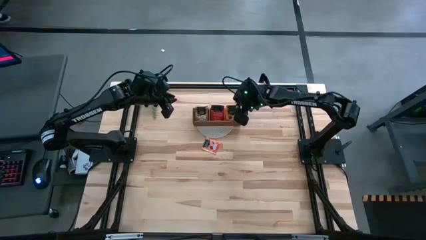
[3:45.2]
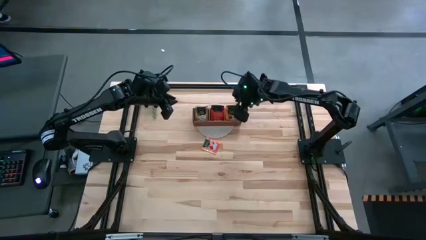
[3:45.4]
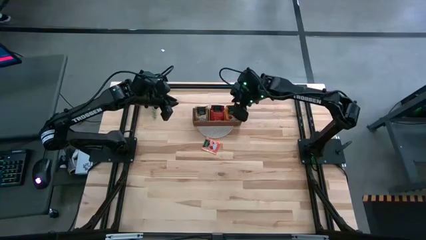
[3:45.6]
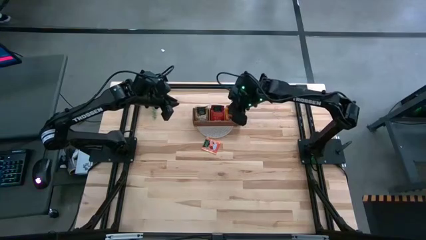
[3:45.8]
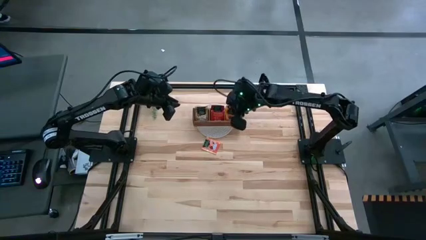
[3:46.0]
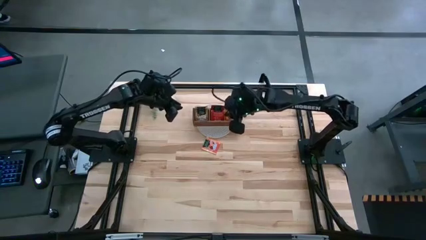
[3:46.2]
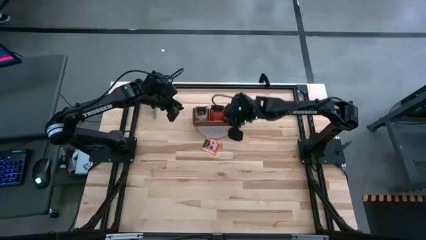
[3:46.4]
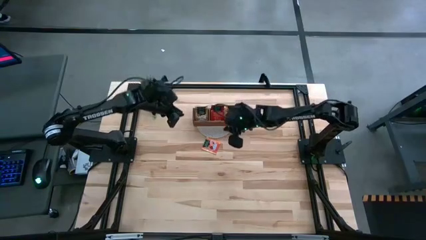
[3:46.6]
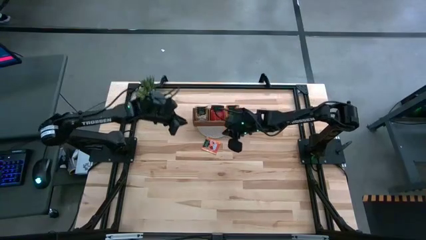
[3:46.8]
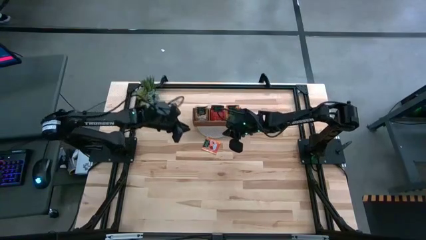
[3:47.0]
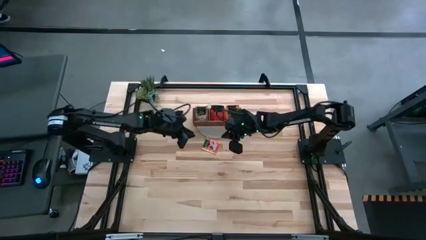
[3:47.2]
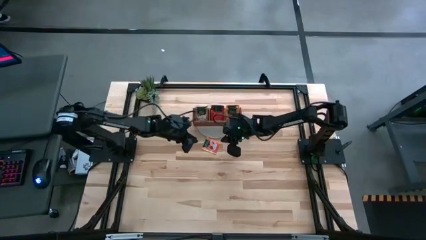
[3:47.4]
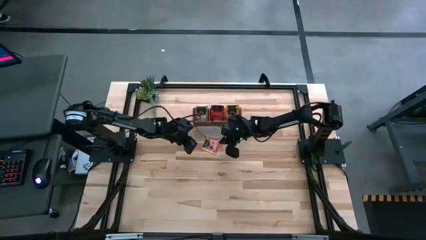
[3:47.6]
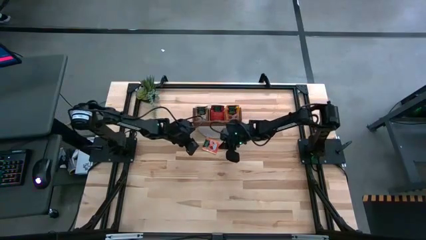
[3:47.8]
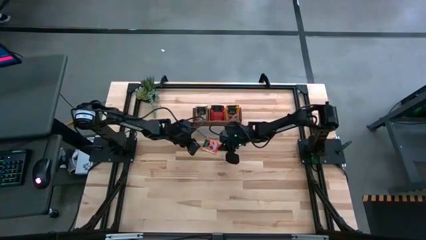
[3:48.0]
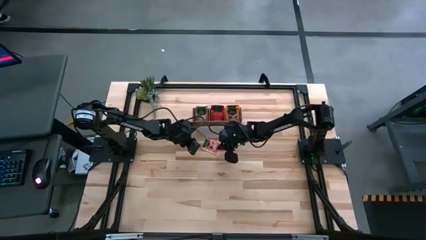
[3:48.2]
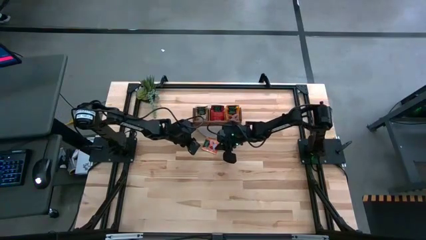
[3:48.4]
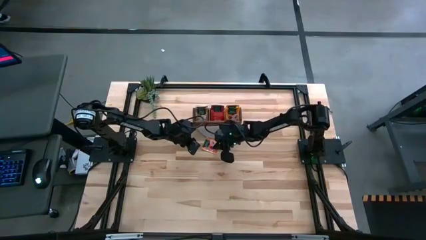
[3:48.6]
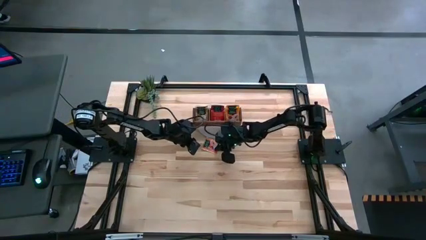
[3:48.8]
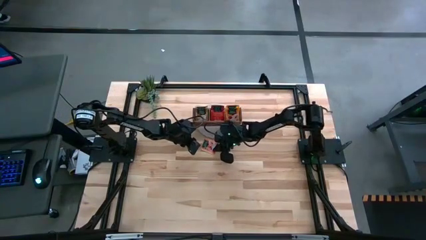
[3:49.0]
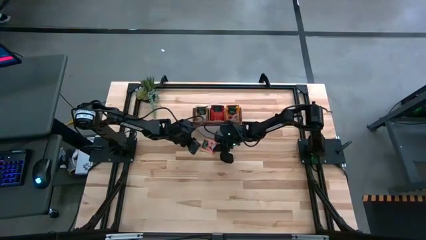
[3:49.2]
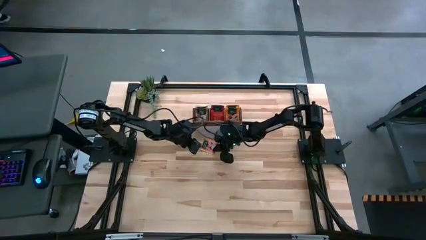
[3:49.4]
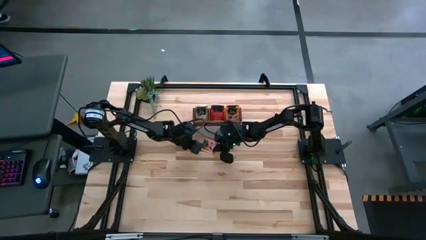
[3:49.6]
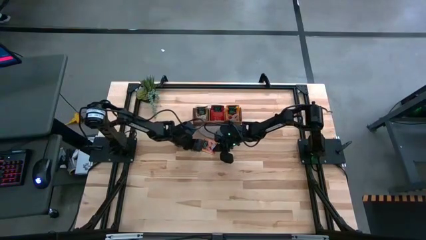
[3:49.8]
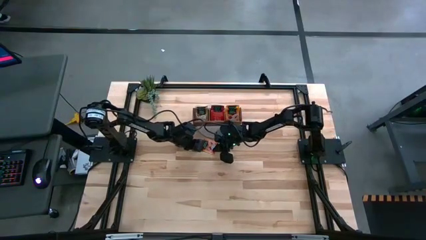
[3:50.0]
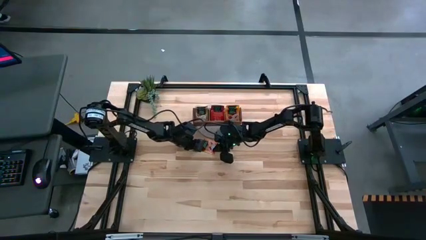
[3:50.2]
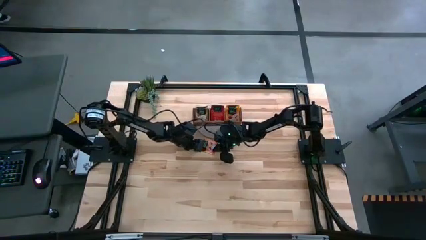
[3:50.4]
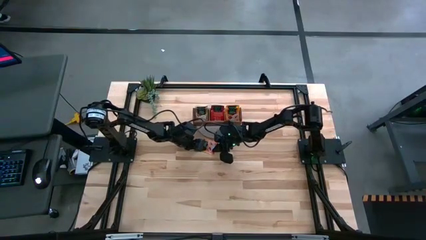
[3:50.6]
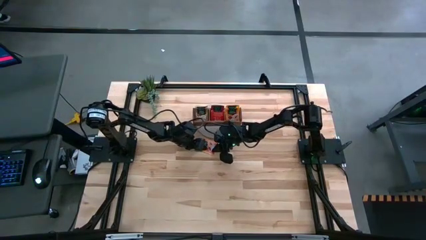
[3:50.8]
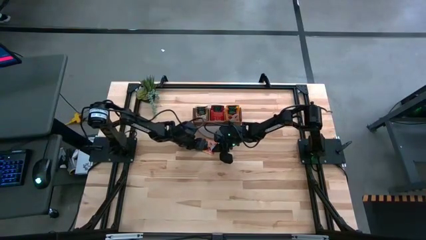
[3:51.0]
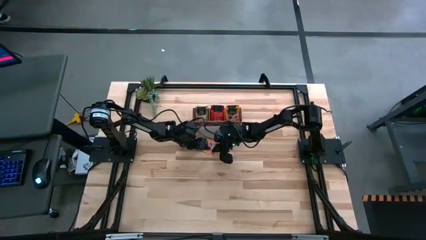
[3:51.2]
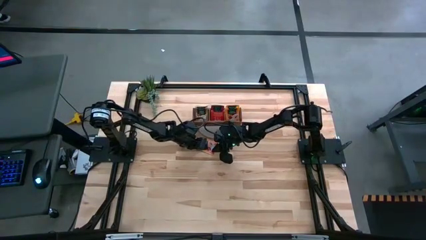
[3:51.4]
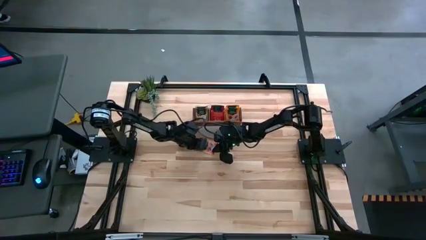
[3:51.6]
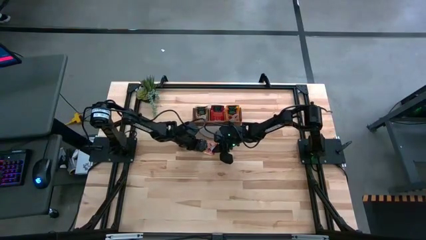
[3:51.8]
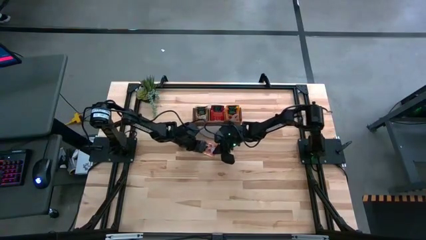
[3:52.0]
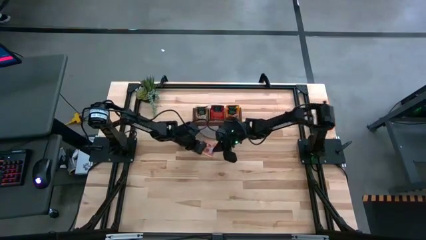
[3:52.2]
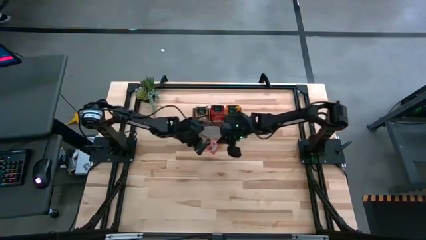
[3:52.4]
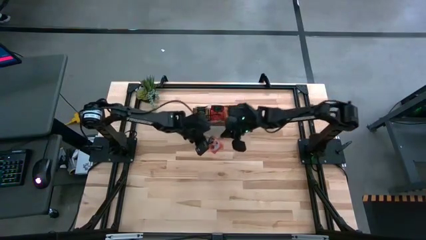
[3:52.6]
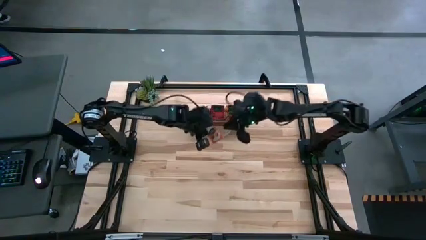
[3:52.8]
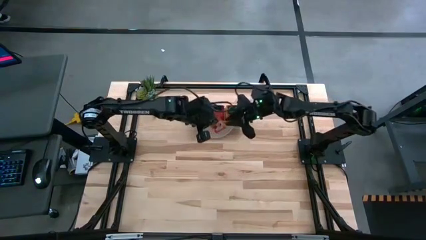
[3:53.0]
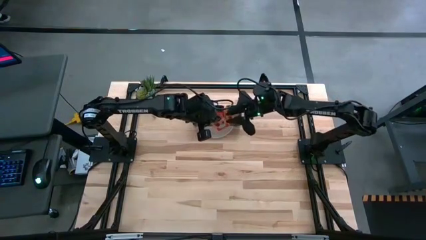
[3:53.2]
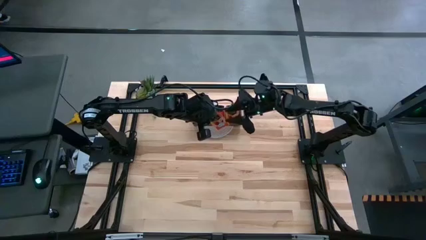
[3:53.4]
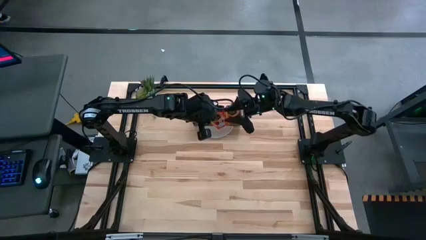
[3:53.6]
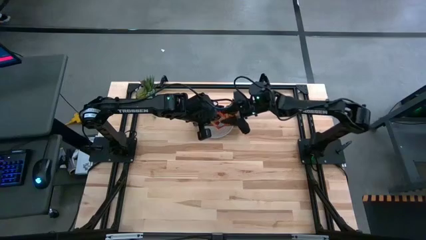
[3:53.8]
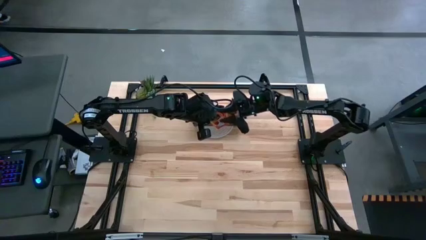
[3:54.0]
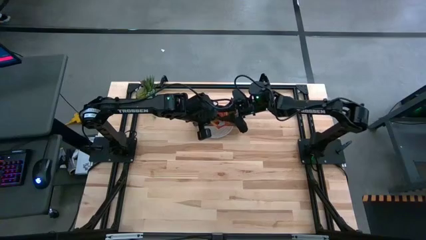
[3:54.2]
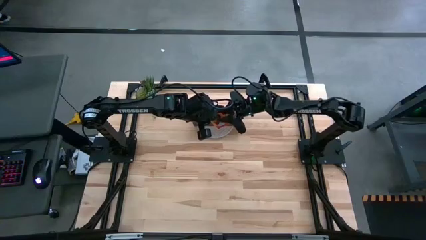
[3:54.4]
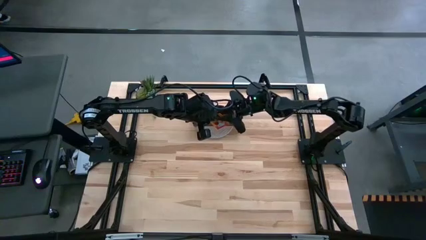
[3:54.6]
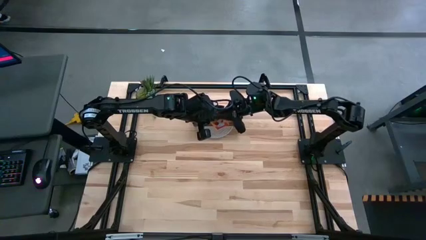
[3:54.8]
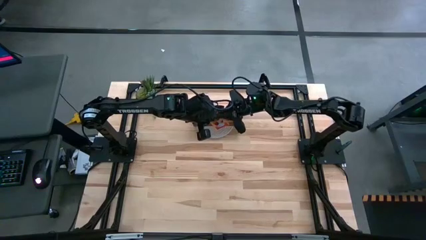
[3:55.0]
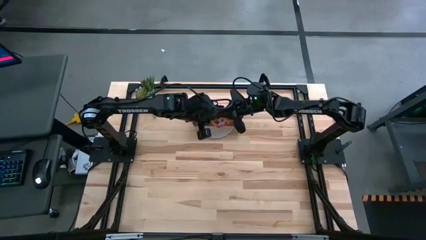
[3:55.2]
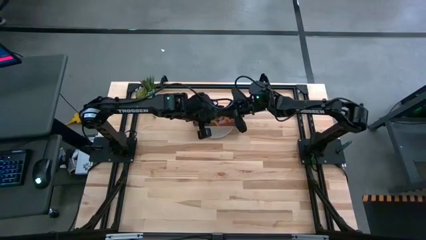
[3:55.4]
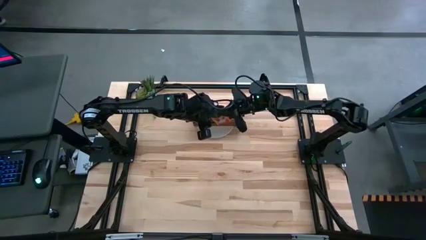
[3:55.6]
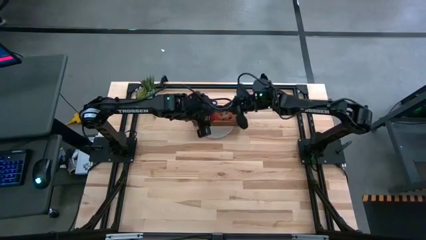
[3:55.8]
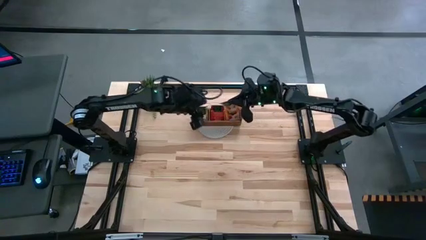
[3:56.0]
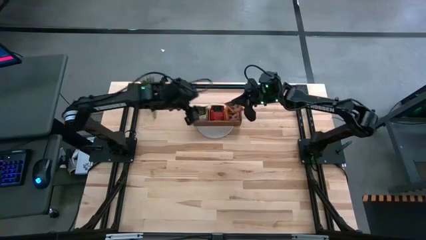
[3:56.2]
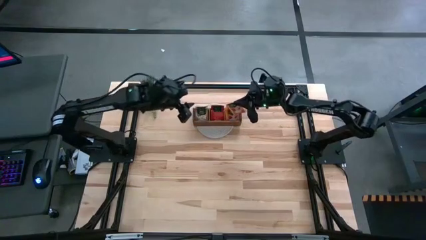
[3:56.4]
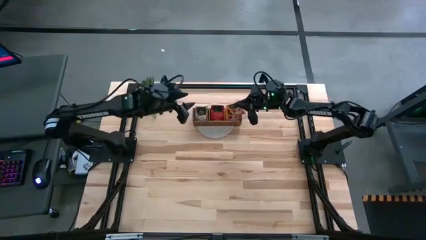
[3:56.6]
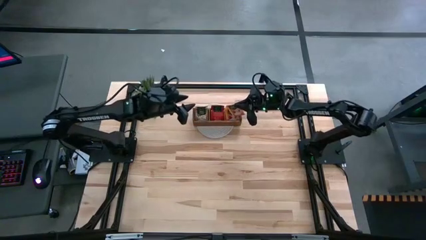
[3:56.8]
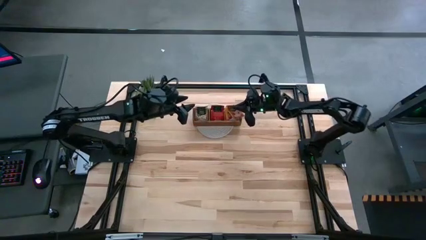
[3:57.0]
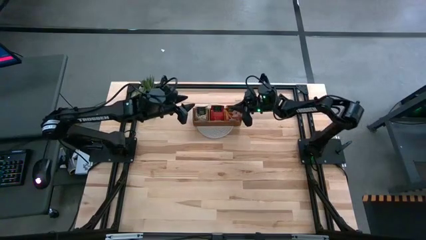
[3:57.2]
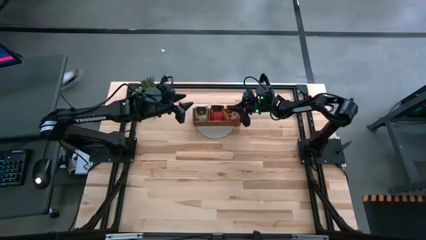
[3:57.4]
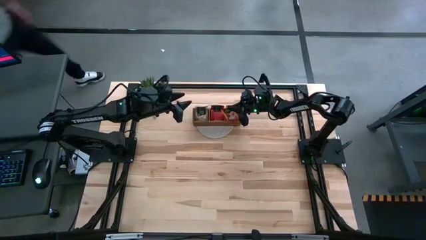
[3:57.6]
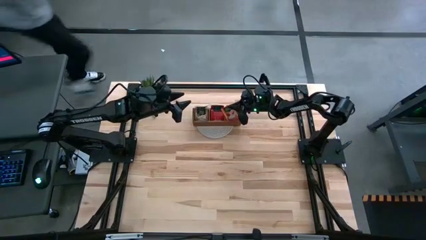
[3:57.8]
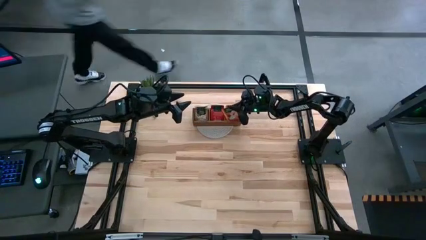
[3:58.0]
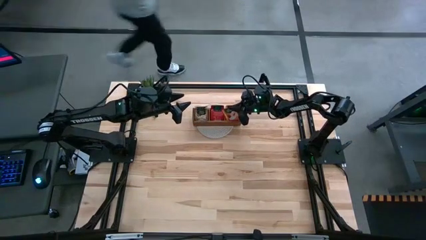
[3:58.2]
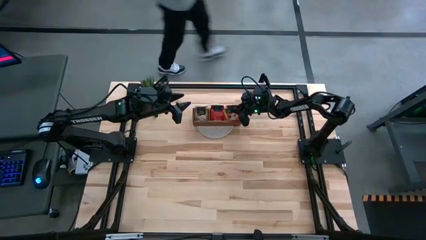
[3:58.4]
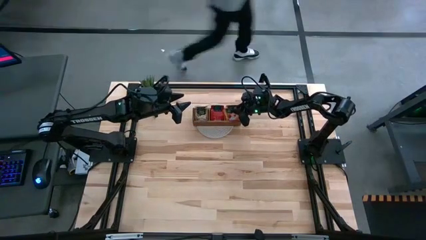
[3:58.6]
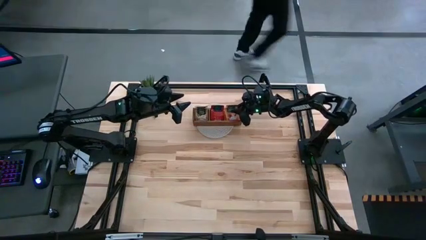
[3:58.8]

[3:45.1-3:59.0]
Task: Pick & Place Tea
Put the orange tea bag in the right section of the wooden organizer

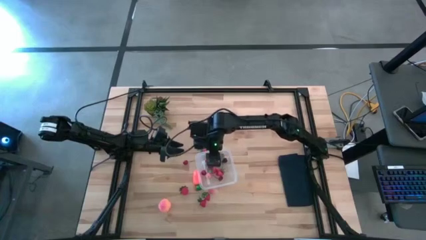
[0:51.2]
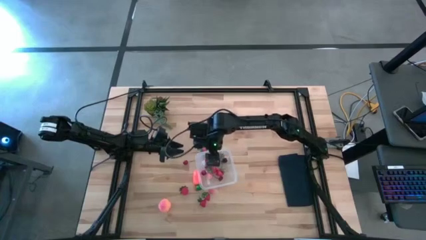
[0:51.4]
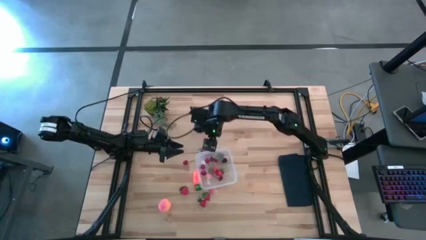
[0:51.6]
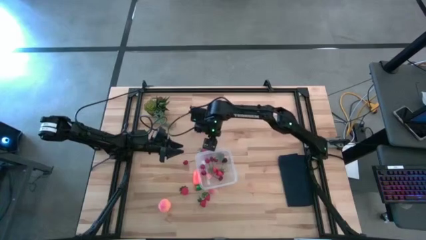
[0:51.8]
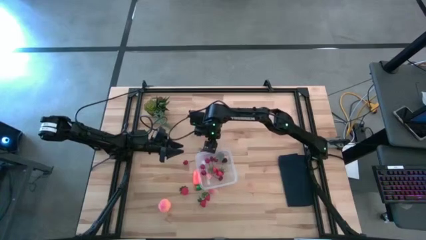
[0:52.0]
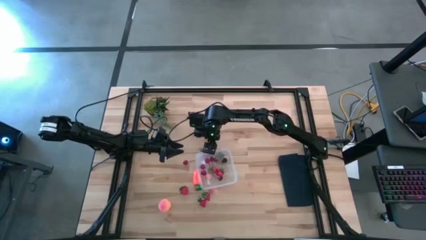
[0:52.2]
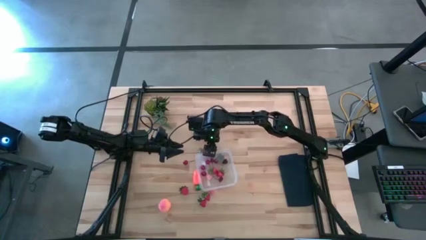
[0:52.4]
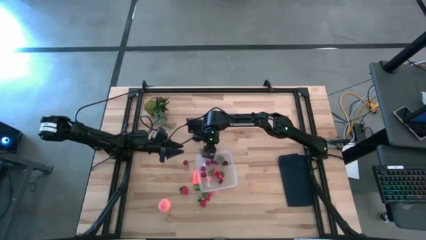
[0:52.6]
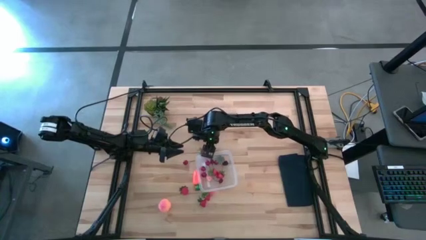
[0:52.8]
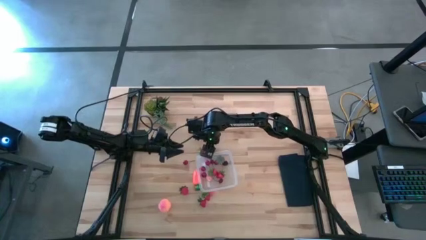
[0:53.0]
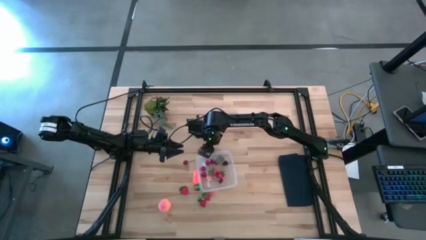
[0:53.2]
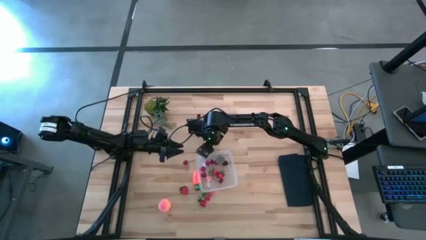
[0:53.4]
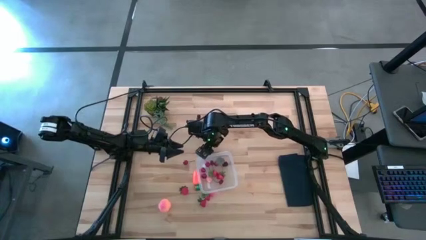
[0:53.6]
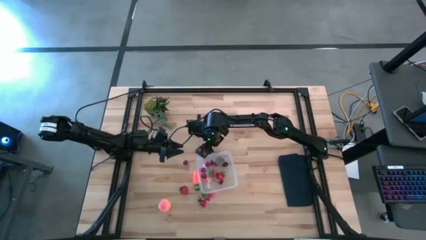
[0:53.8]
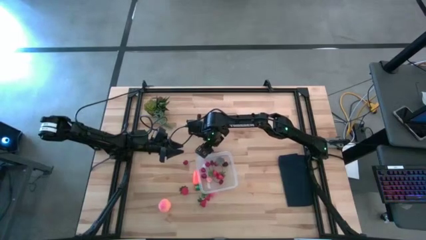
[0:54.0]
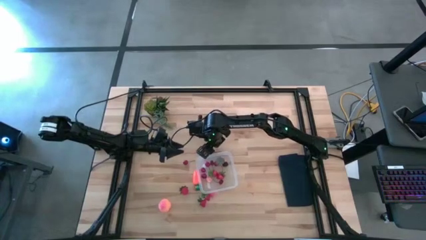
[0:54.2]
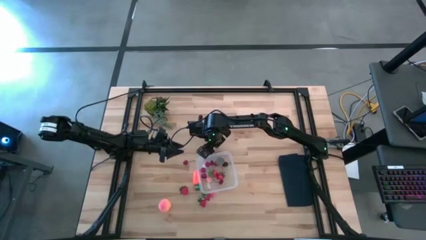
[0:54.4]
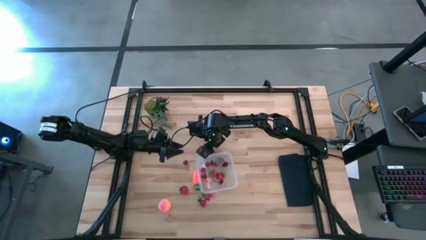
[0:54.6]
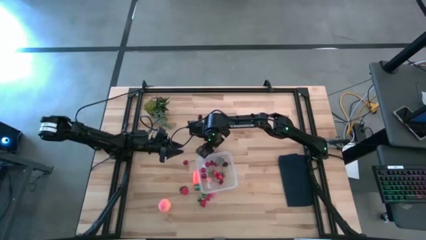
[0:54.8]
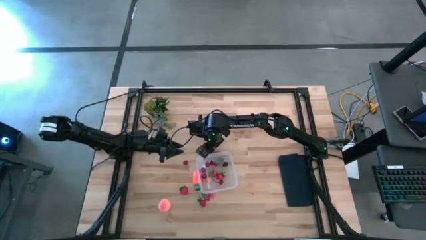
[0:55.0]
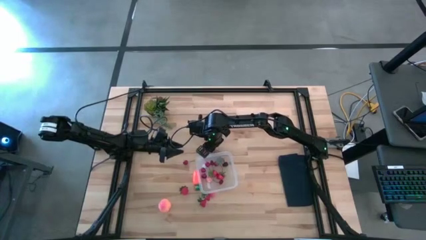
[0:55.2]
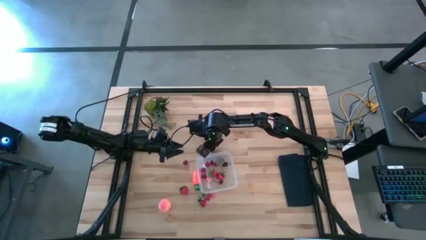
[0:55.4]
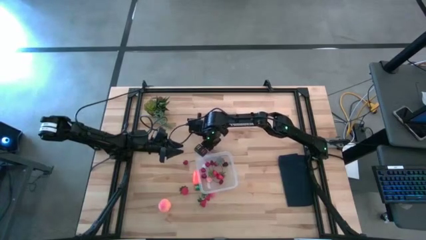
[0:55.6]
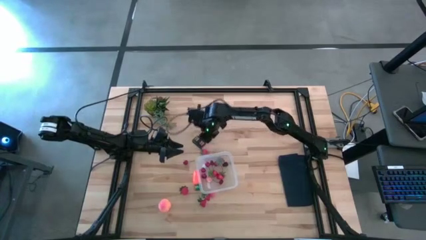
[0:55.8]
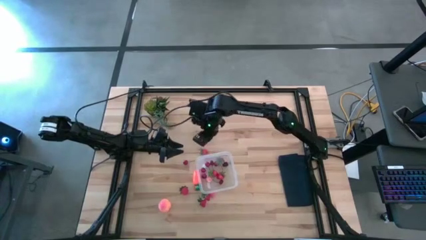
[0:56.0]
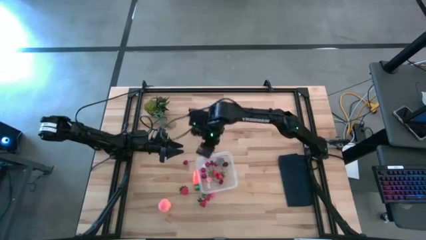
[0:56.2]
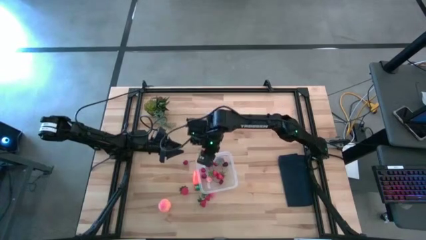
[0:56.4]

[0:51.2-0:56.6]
Task: Pick and placing Produce into tupperware
Put the cherry into the transparent container
